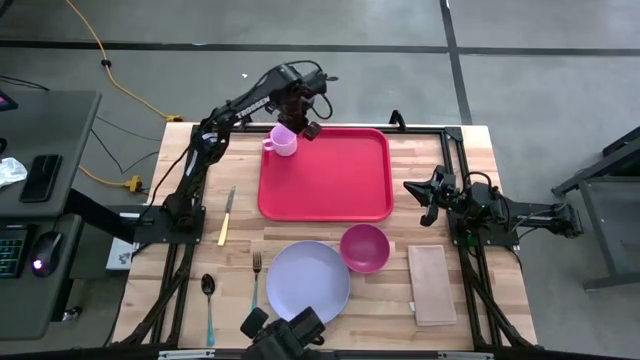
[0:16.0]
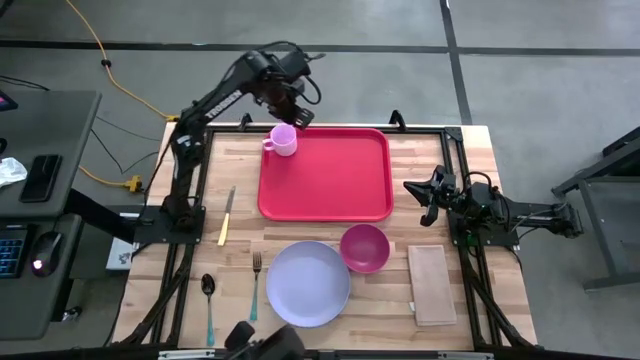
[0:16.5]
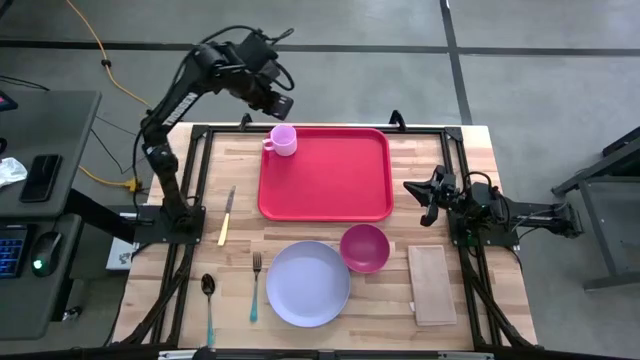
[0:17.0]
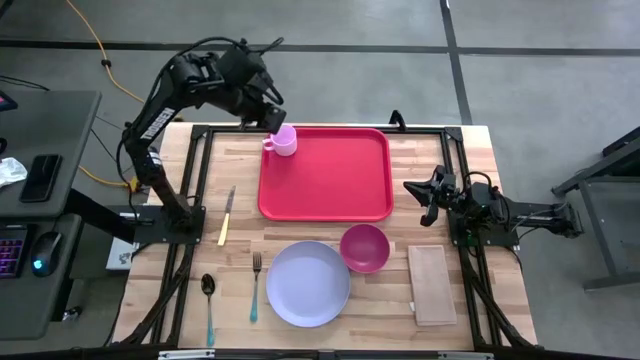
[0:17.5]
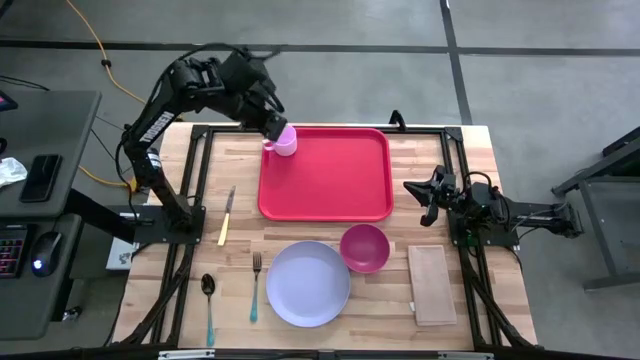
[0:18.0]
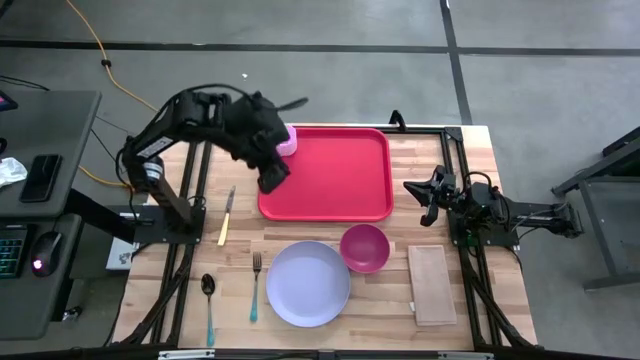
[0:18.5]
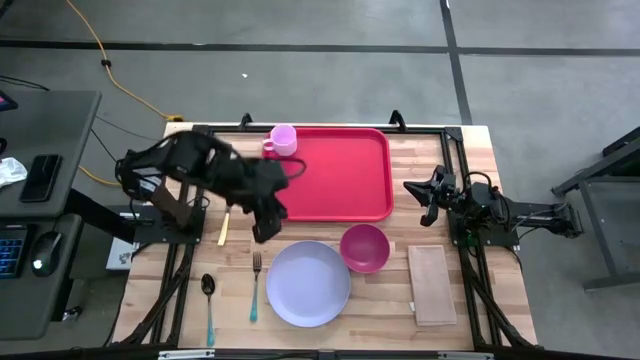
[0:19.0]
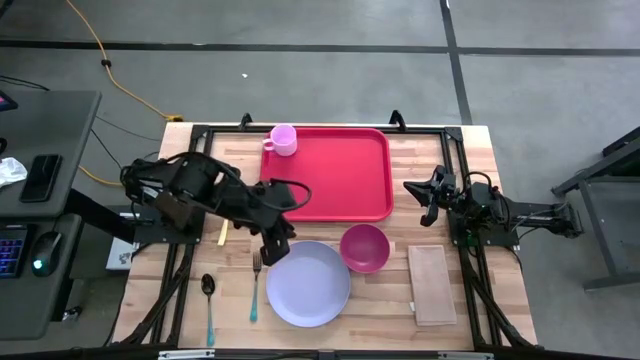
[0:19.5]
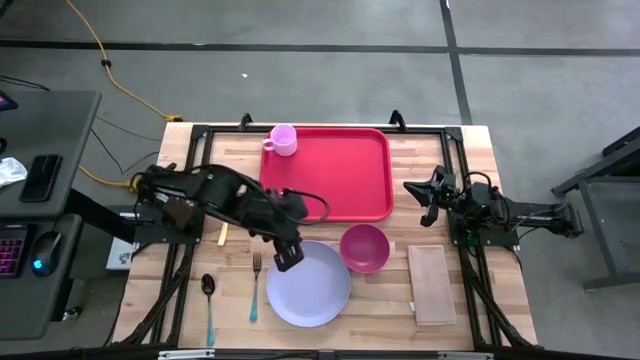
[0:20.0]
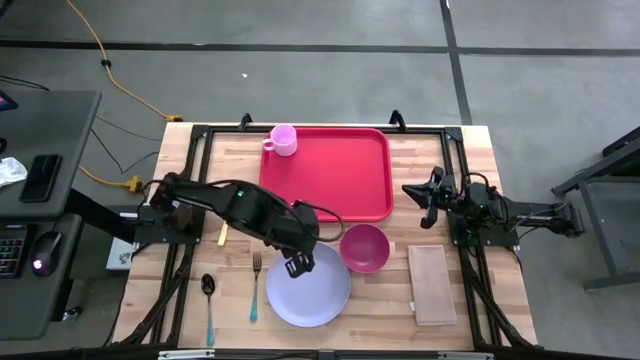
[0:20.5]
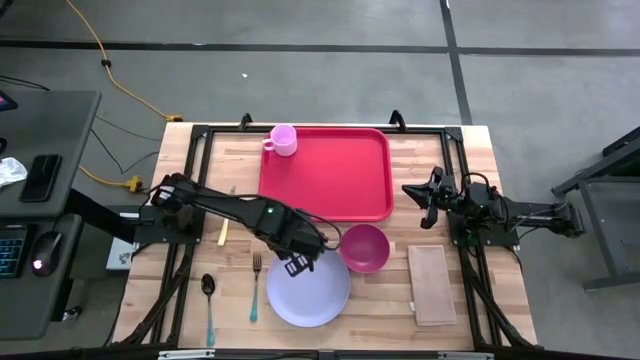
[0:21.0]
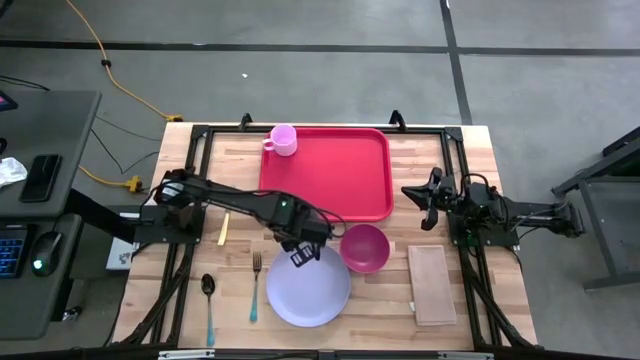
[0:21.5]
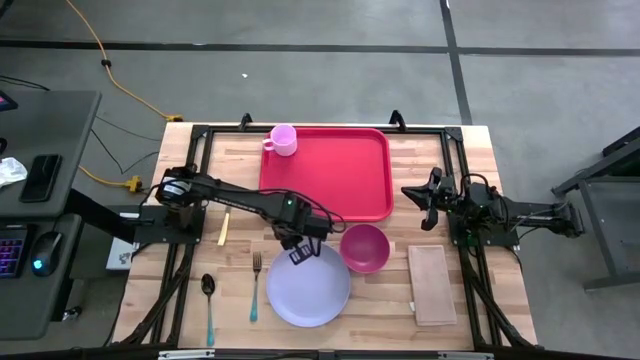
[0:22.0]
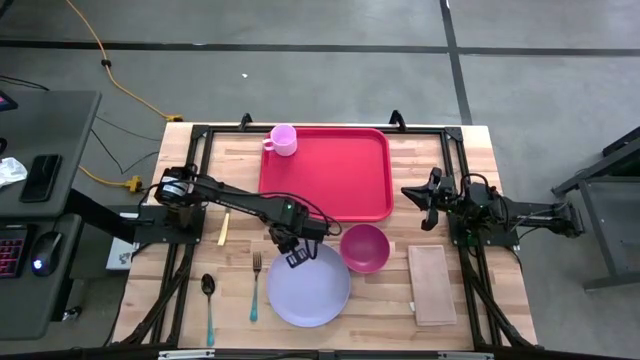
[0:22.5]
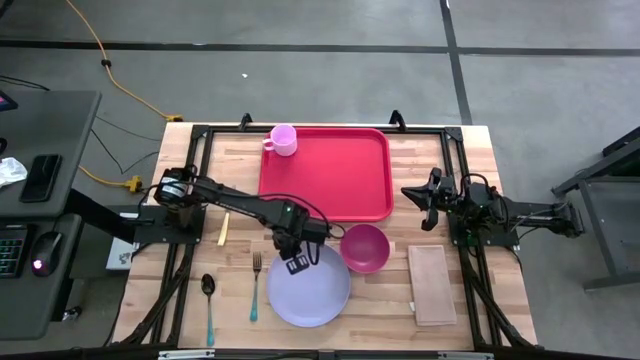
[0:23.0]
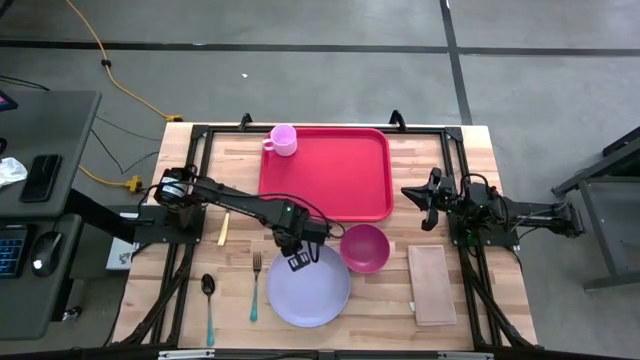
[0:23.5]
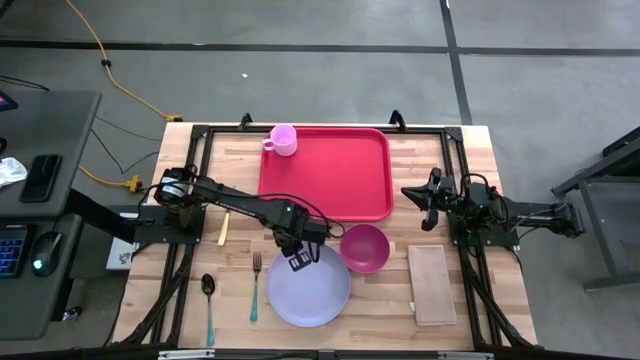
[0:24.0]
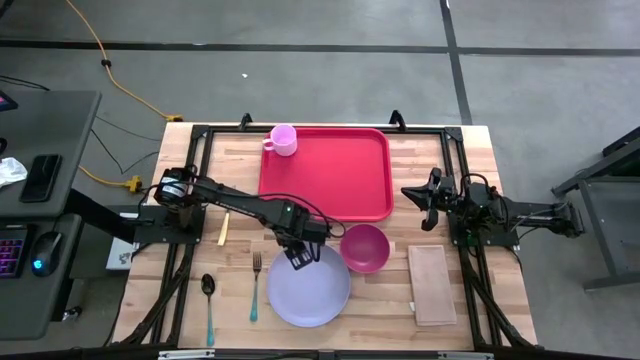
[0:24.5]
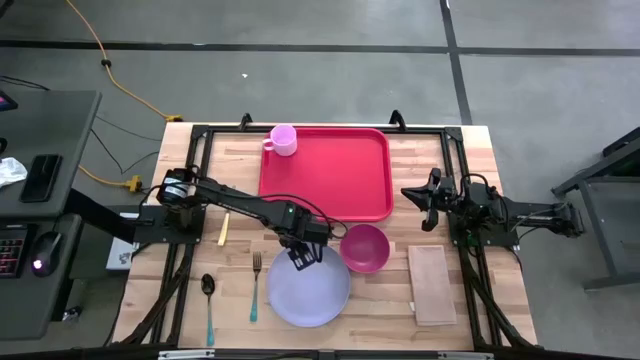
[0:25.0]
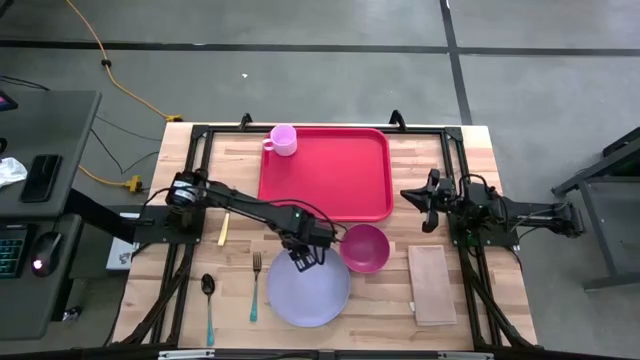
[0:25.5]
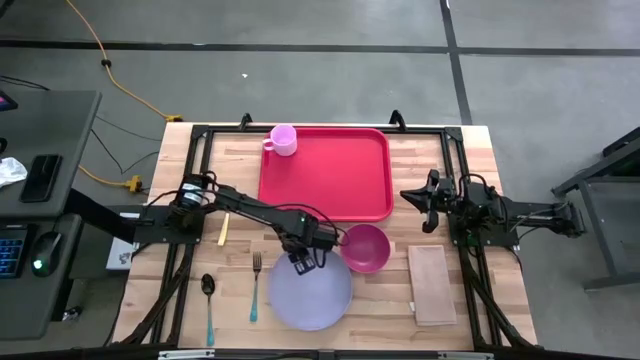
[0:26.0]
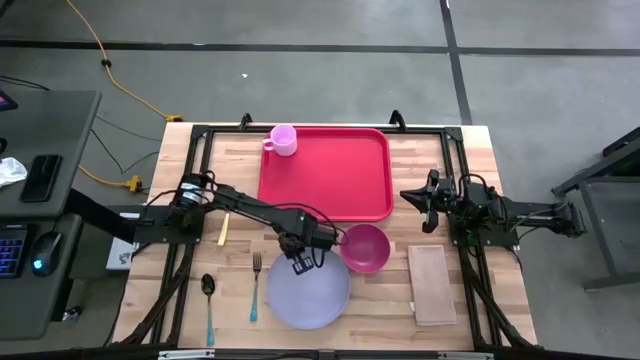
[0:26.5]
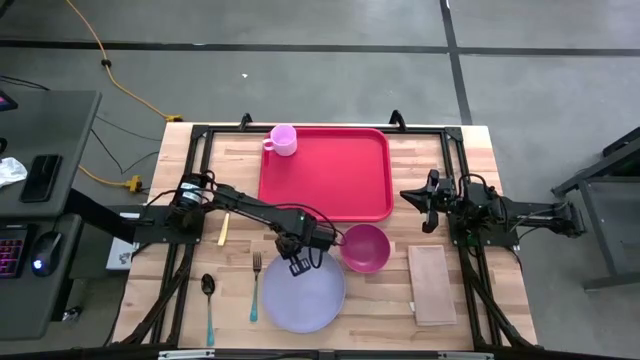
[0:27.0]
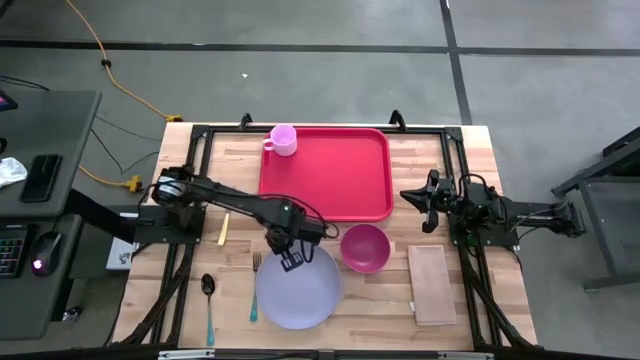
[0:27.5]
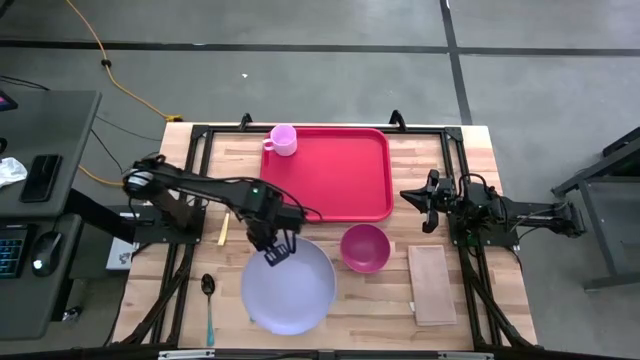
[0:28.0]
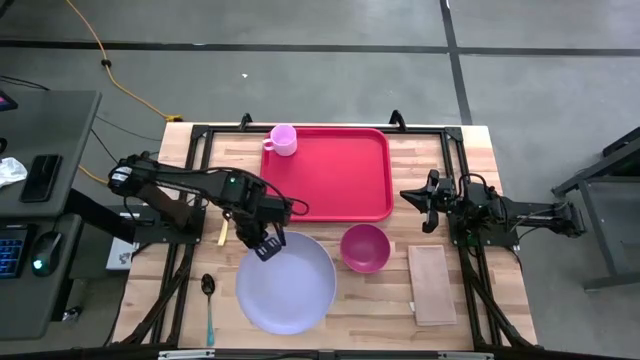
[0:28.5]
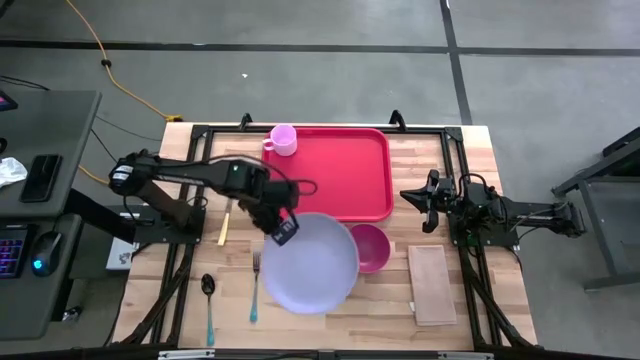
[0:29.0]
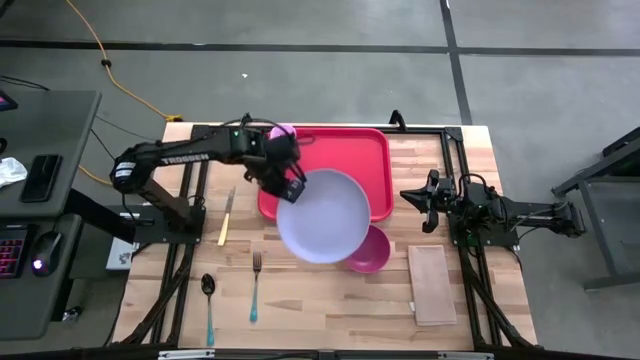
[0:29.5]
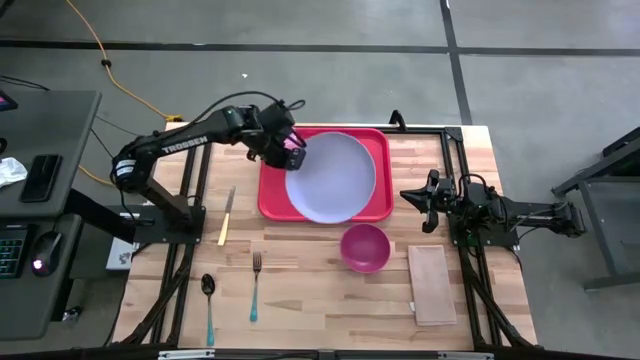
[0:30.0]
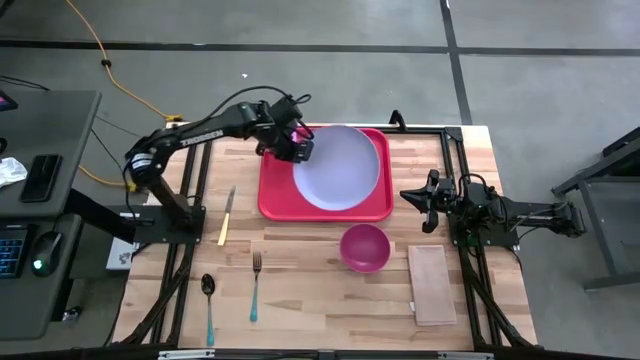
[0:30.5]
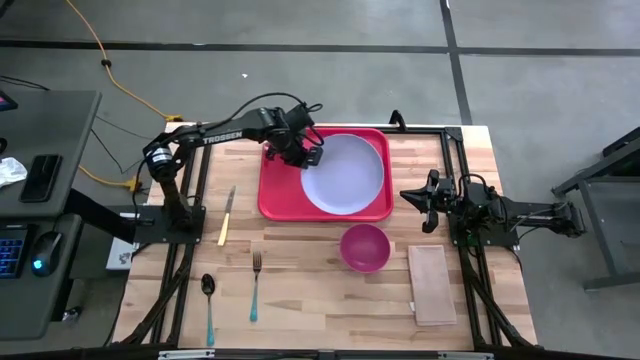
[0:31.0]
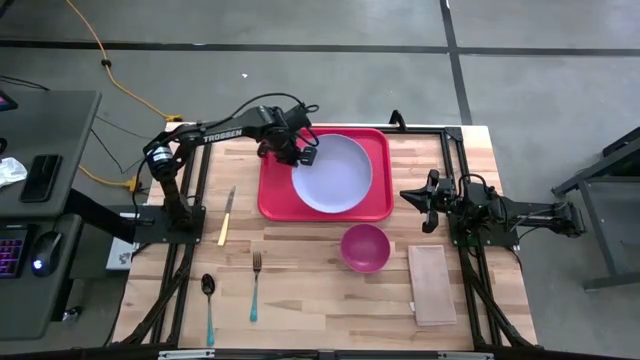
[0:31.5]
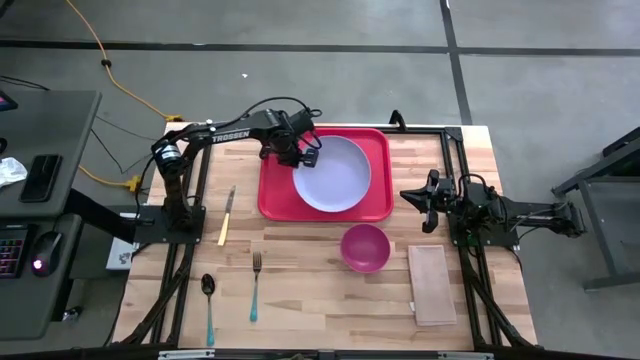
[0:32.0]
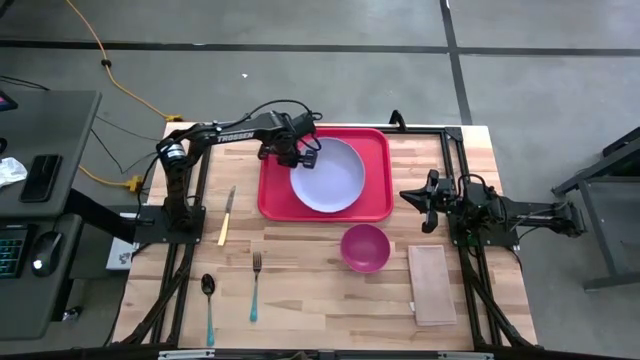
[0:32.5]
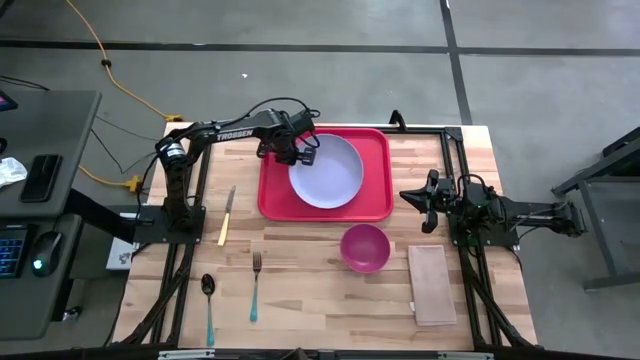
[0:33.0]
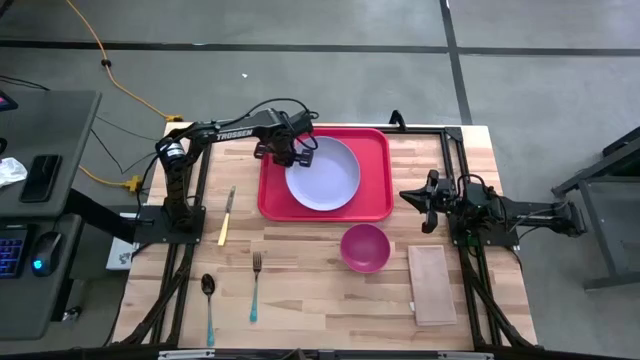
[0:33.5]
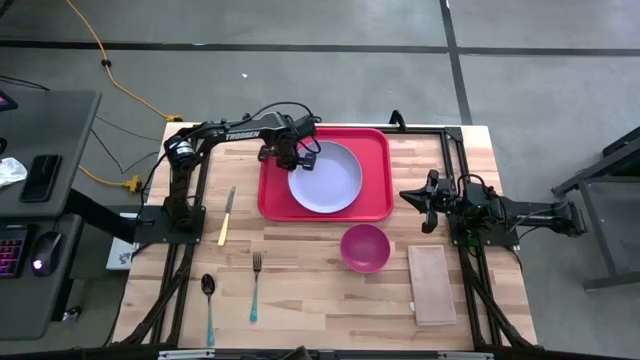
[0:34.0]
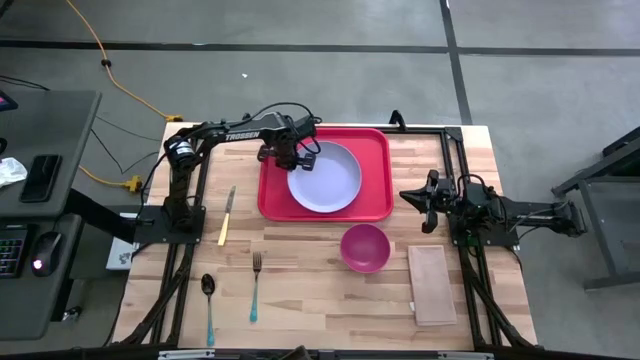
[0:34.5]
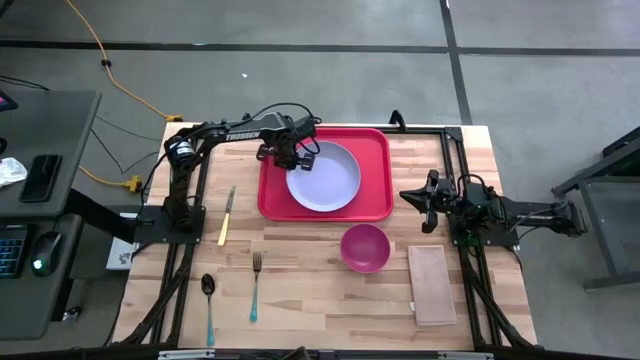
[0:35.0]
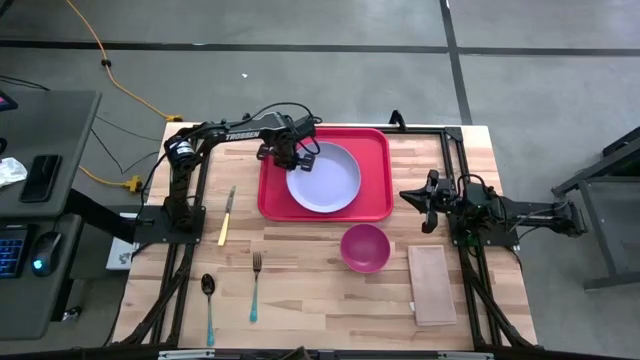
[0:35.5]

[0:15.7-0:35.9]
Task: Set up tray
Put the blue plate at the bottom of the pink mug on the orange serving tray
